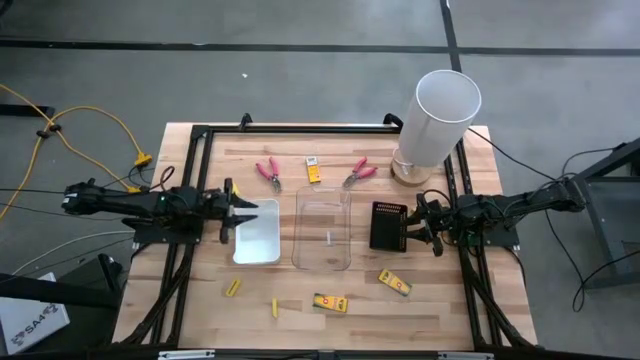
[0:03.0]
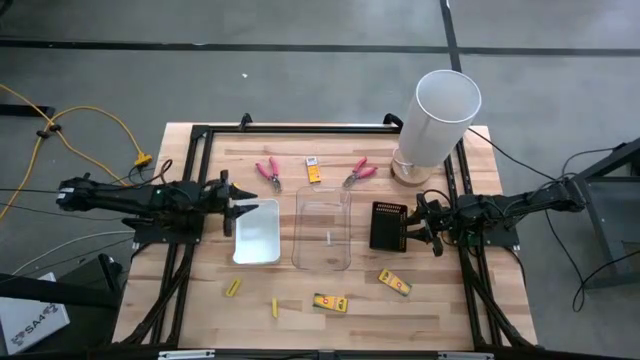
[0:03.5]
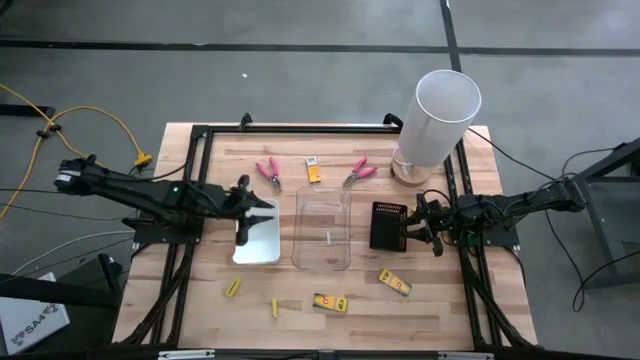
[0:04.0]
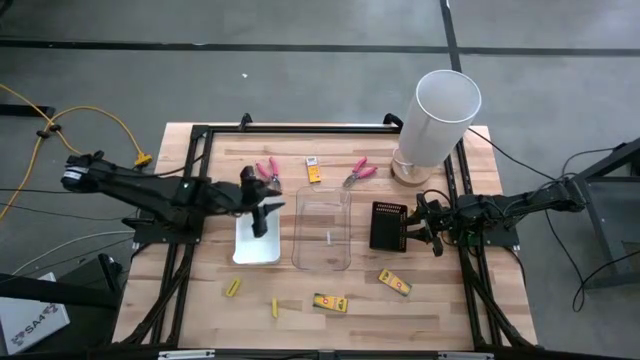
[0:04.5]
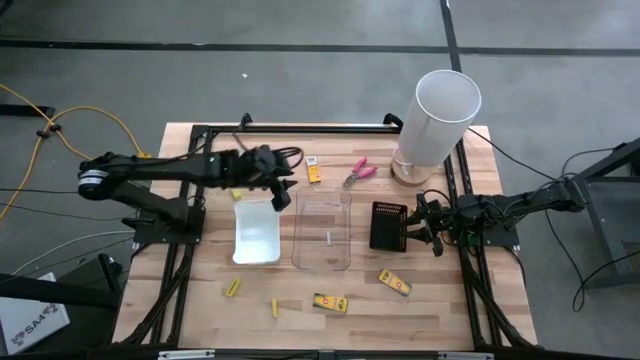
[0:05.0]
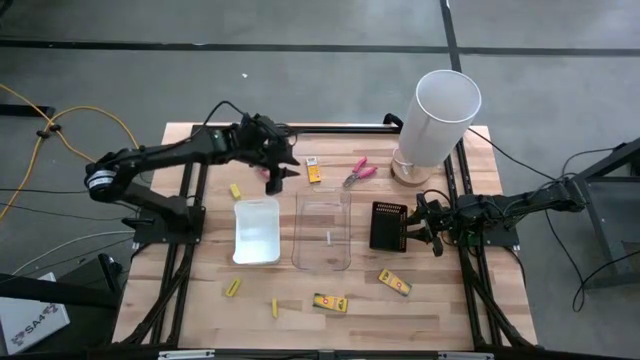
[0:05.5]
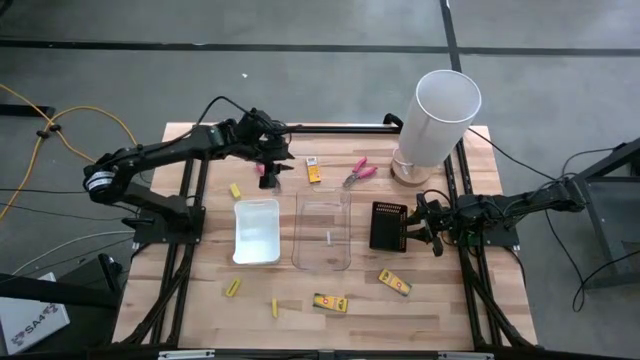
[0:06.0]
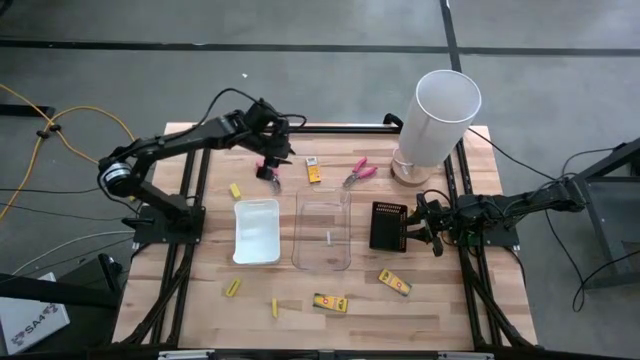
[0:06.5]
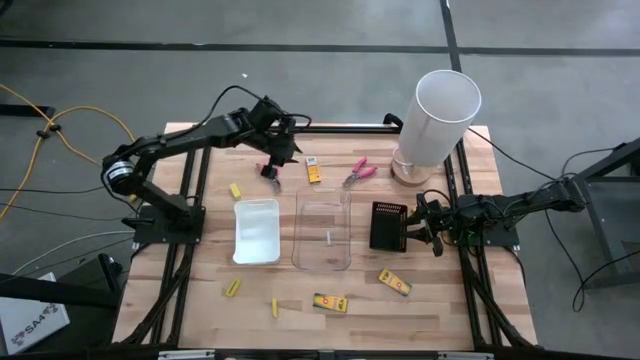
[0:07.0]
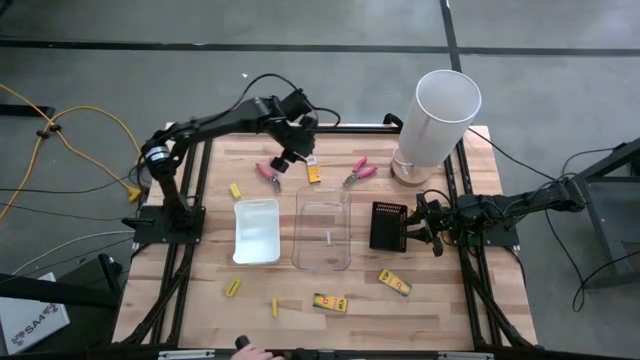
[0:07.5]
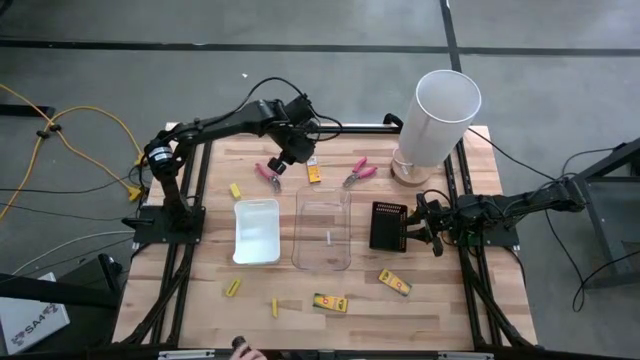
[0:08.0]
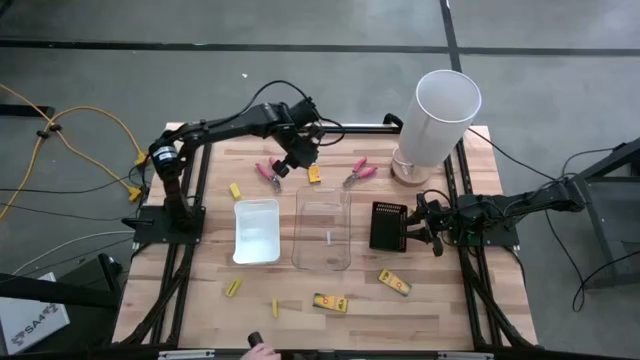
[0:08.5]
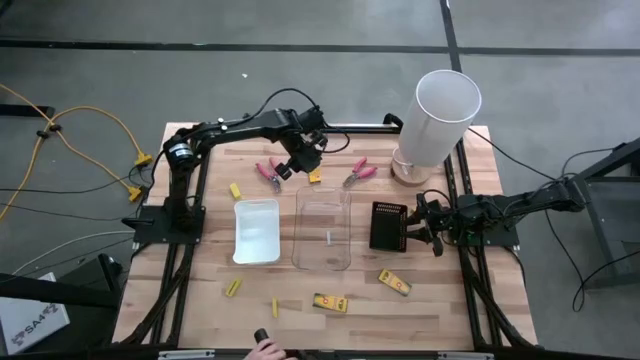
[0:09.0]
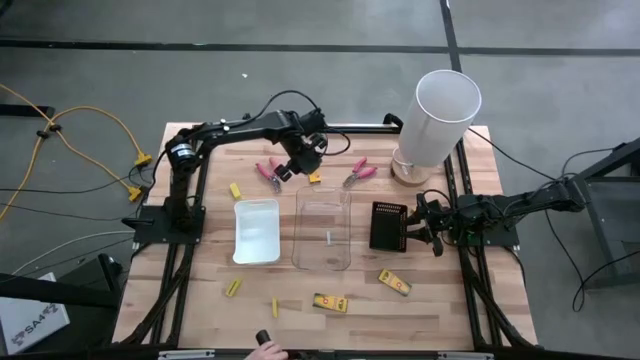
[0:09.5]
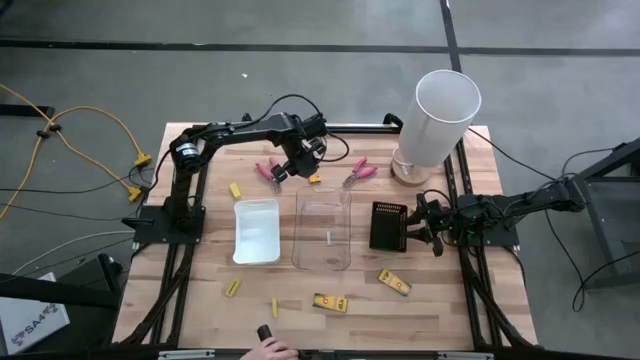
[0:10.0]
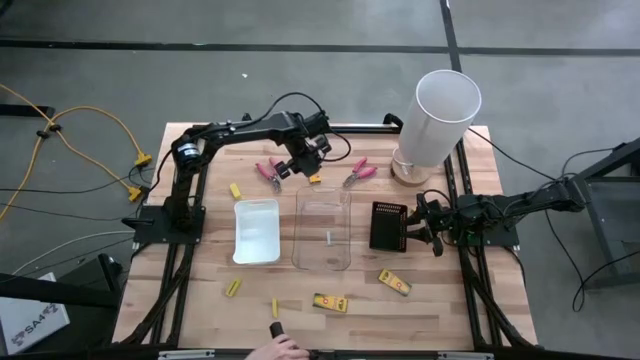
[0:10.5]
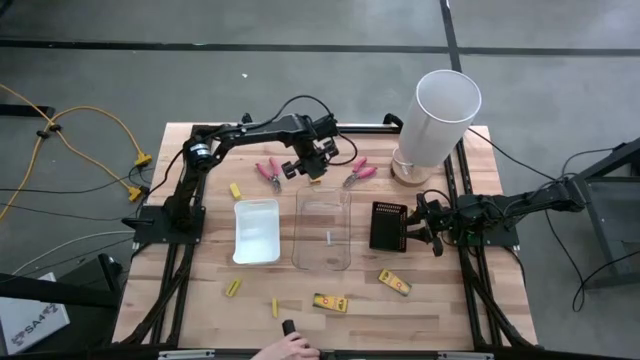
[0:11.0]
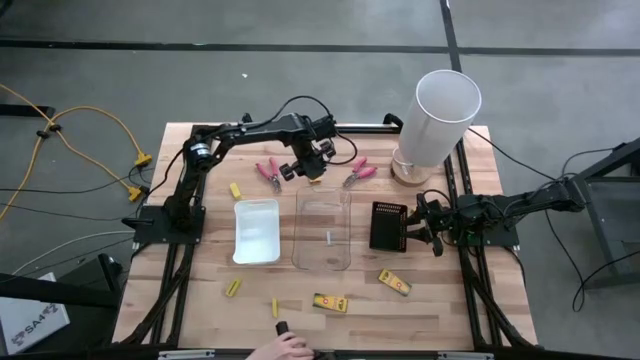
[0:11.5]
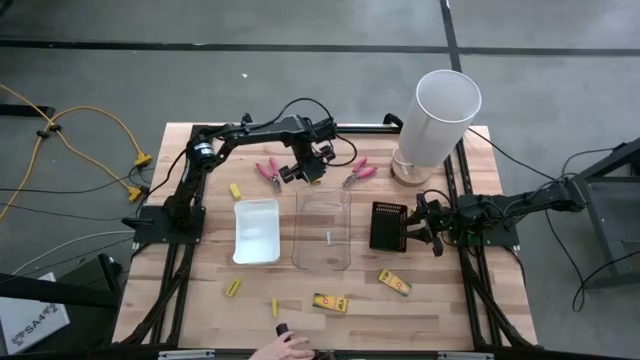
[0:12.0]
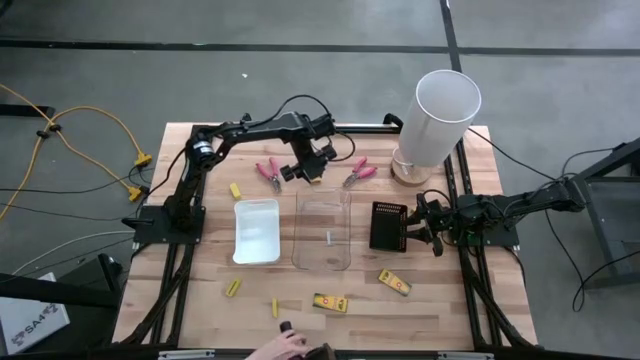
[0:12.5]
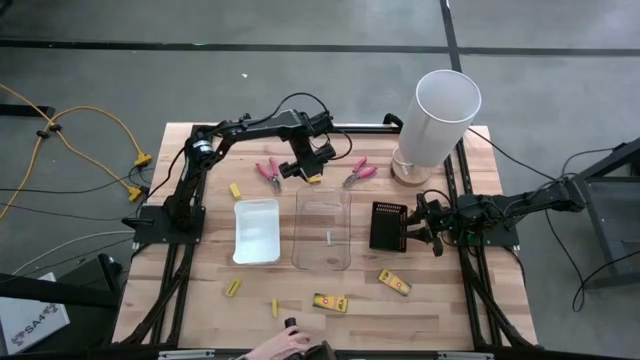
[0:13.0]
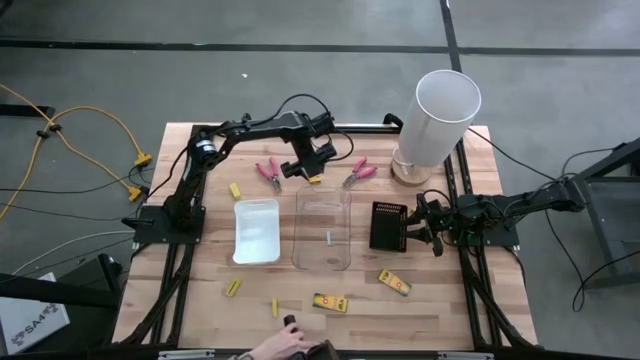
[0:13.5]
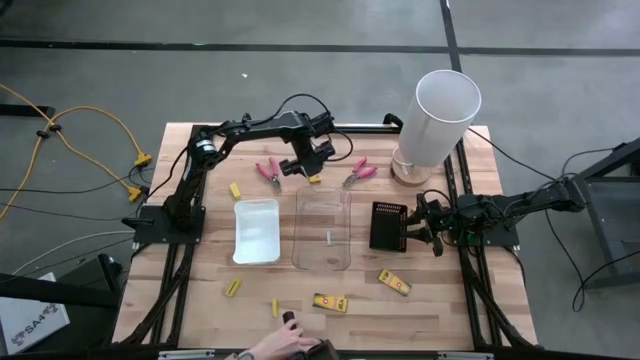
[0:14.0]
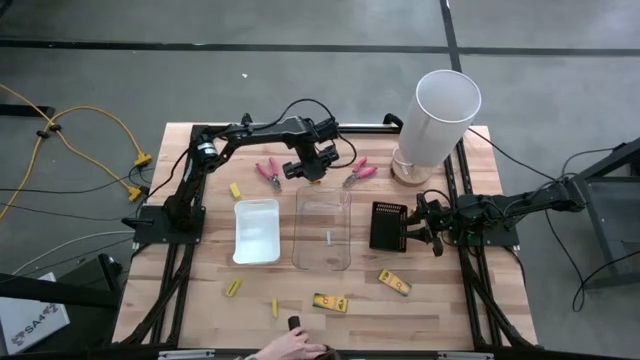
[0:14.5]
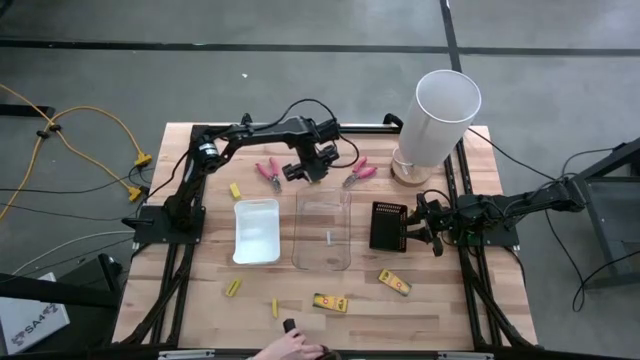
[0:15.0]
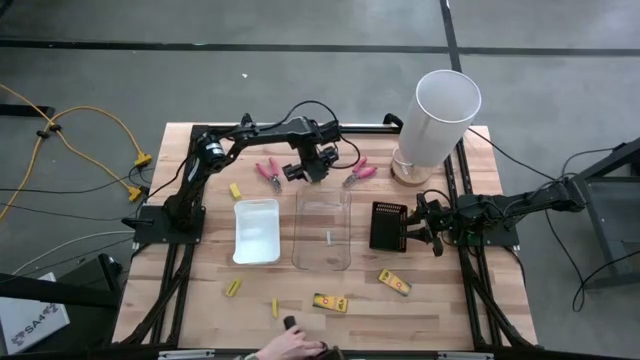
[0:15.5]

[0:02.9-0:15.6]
Task: Pick & Place School Supplies
Put the crayon box into the white bin
